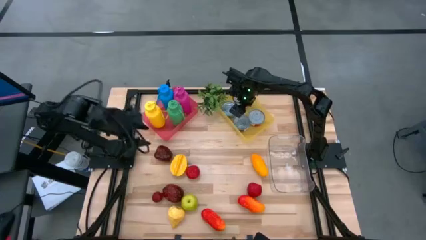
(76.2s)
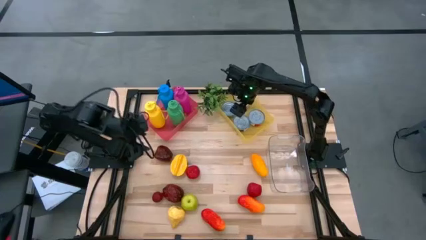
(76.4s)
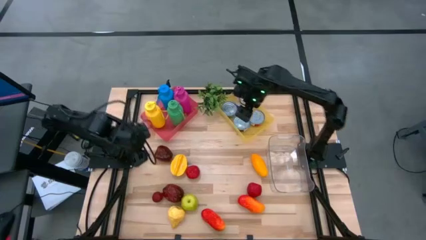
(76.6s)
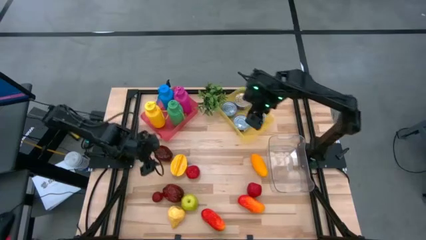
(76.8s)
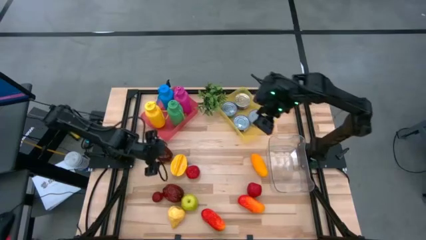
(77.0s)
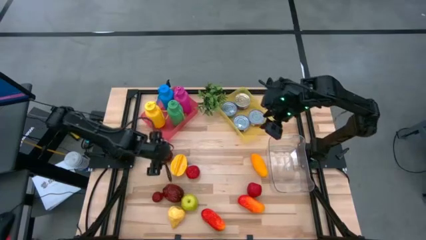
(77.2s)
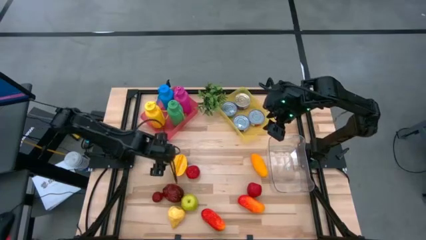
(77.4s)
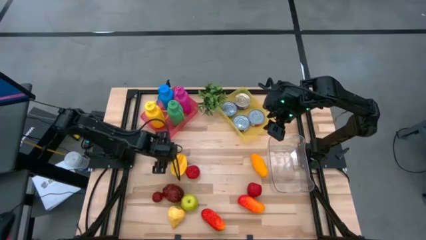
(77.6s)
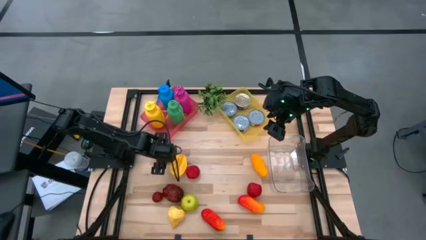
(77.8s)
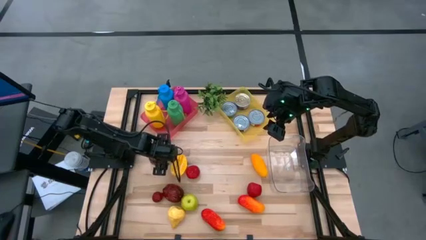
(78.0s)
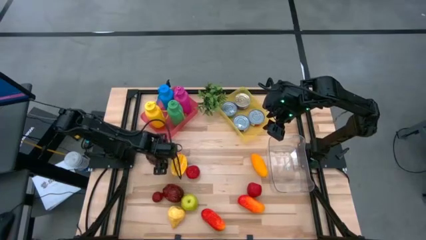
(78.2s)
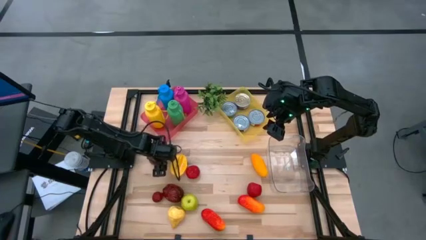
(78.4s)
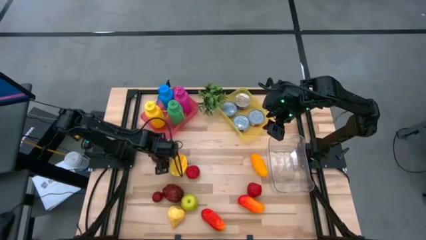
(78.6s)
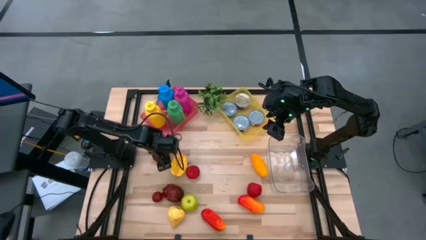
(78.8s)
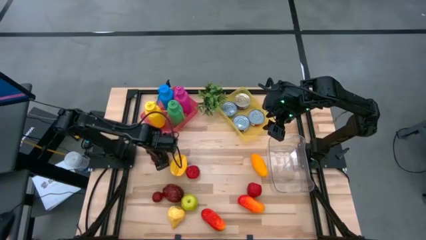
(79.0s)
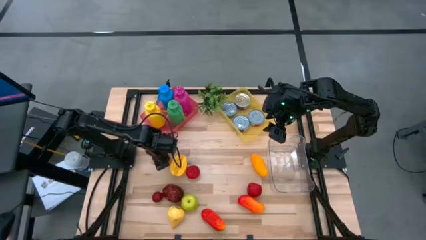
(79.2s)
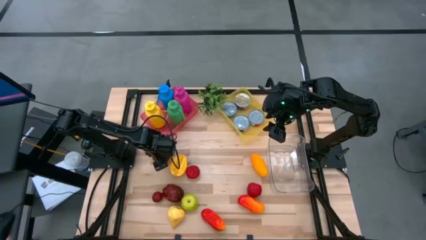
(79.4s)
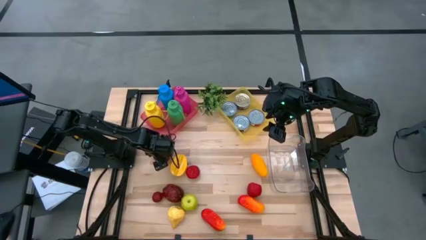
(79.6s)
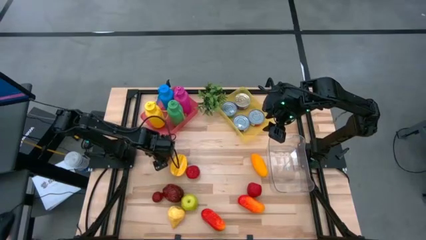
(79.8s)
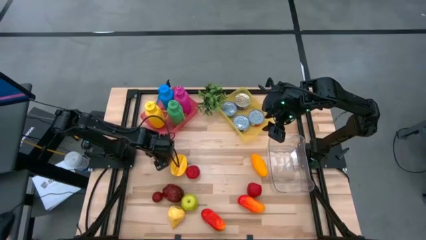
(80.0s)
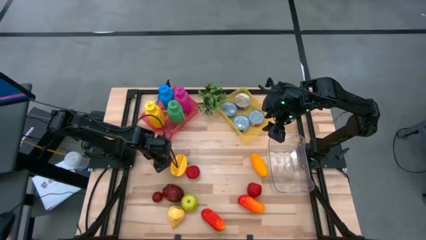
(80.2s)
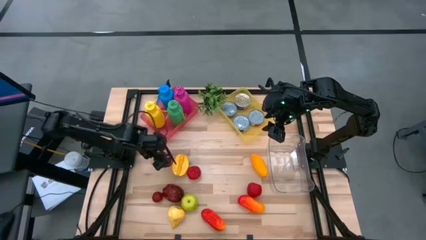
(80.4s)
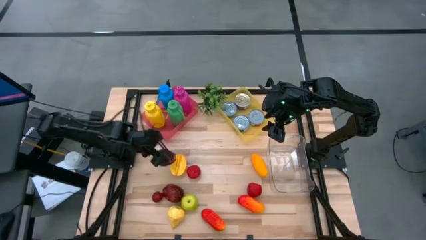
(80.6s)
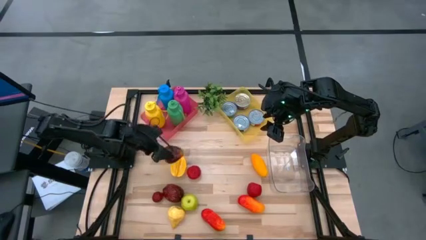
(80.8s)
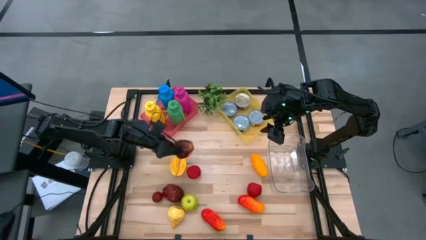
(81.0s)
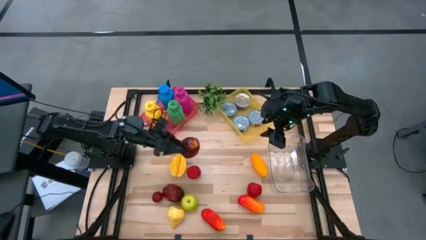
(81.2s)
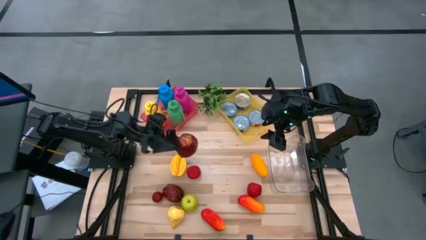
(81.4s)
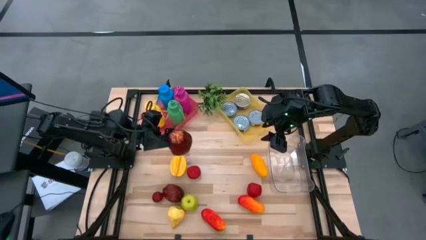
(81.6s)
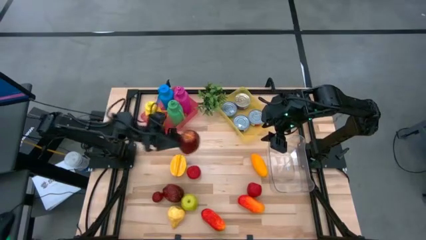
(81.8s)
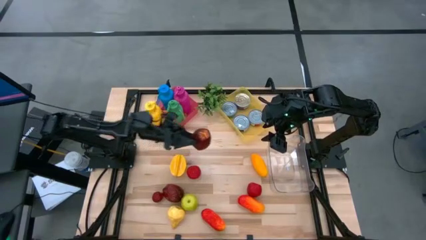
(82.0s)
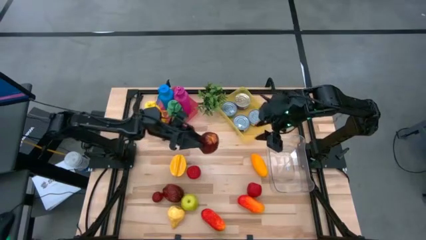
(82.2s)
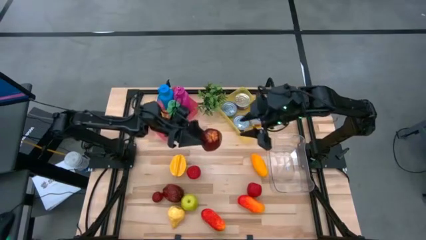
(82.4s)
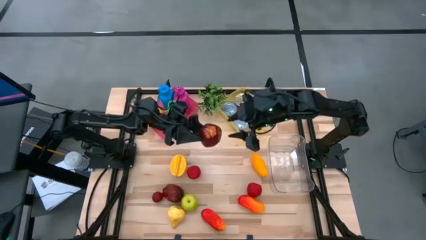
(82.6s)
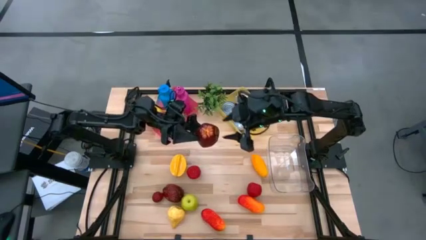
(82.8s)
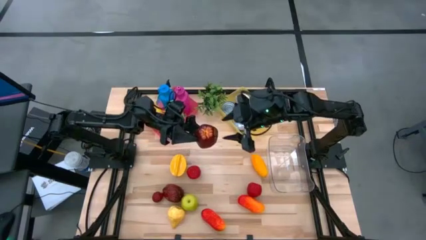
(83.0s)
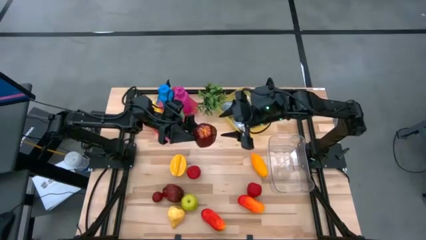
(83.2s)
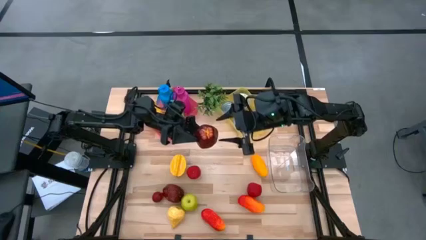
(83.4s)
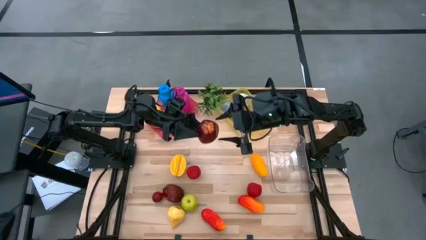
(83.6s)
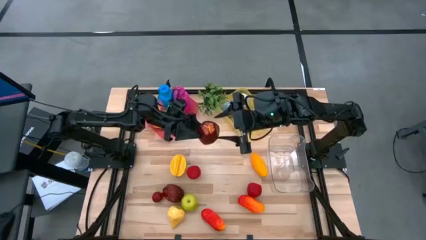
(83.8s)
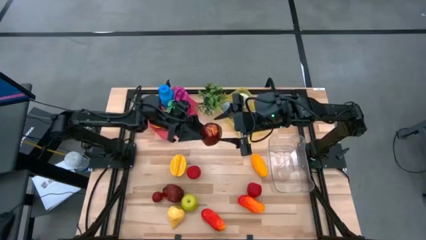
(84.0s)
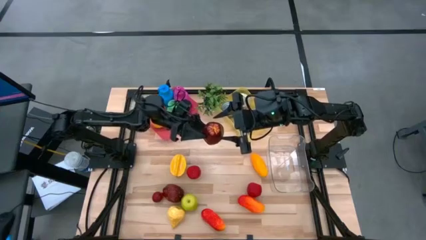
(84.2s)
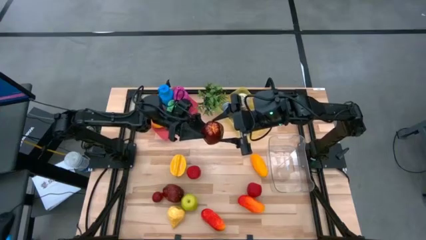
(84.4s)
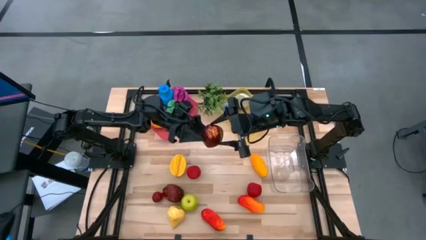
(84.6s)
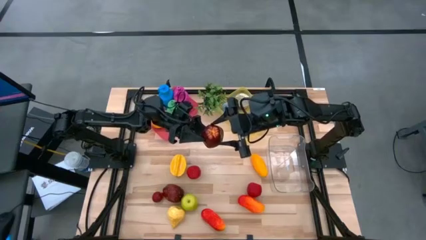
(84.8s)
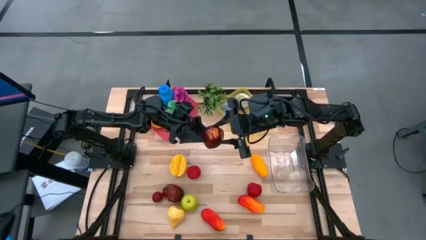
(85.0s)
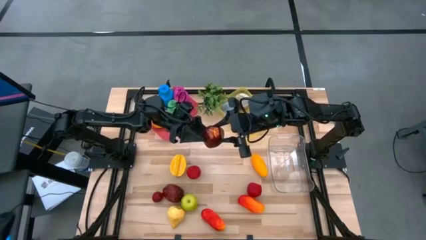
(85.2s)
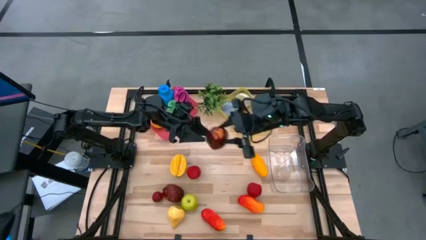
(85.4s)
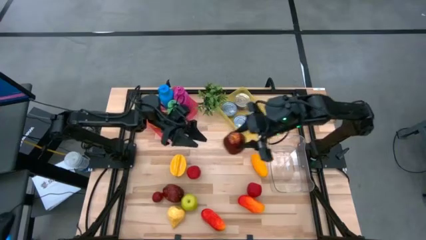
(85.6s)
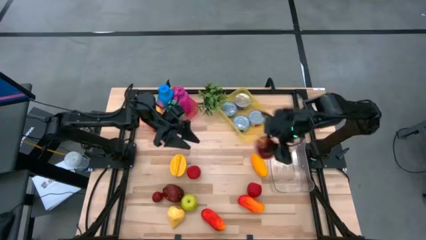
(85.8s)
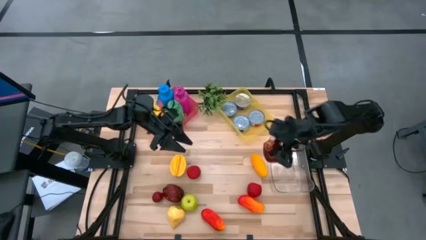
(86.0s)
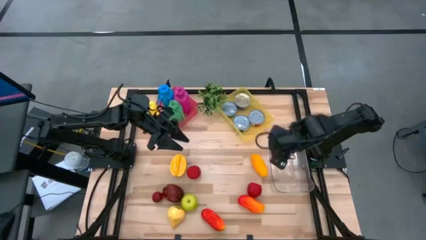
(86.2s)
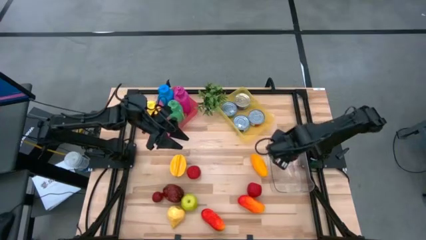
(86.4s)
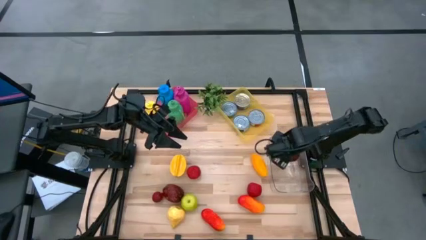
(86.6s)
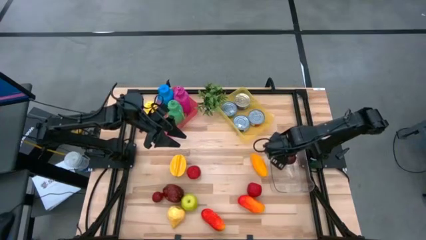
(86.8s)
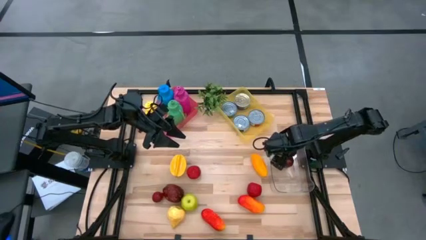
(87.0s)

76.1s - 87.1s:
Task: Pick & Place Food Item
Put the top dark red apple into the transparent bin

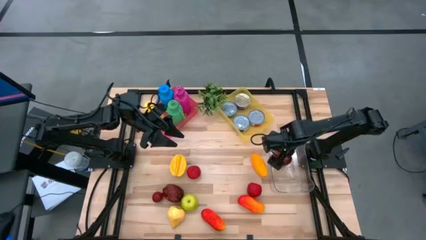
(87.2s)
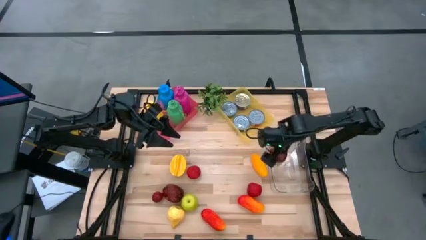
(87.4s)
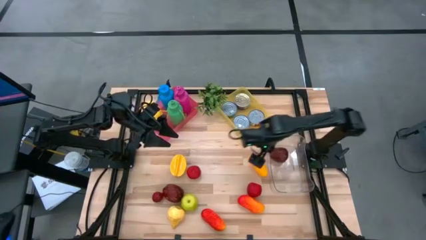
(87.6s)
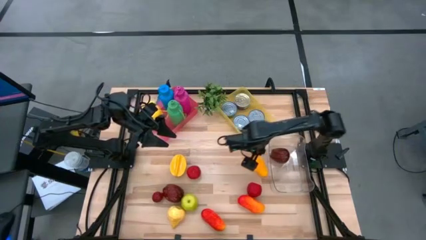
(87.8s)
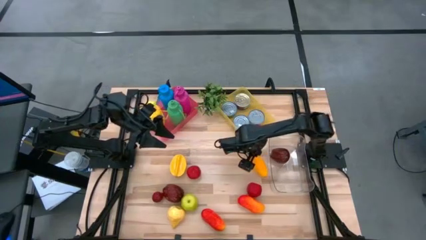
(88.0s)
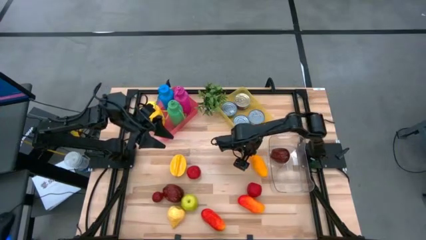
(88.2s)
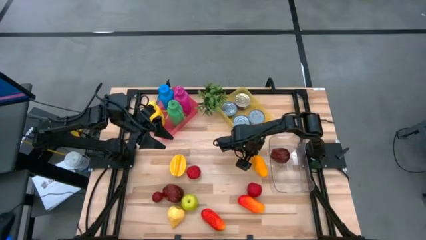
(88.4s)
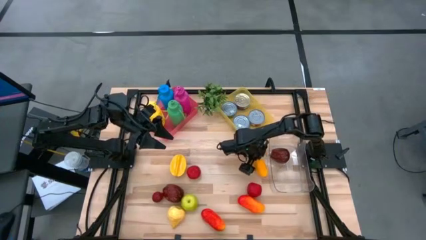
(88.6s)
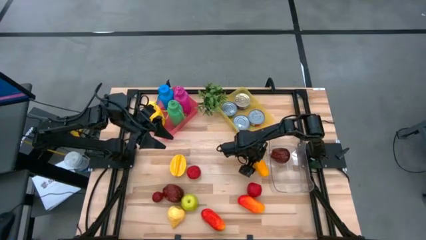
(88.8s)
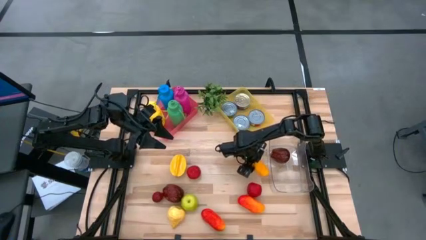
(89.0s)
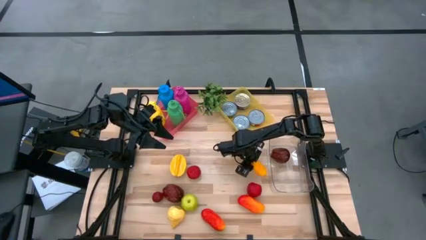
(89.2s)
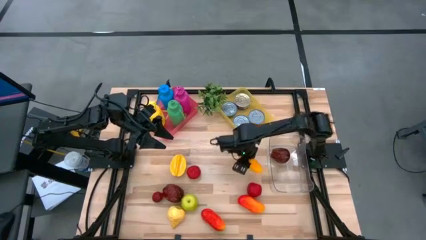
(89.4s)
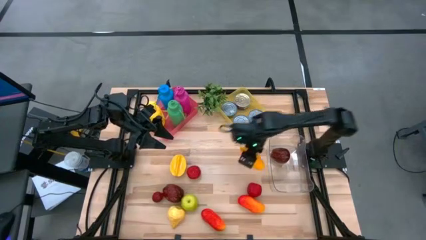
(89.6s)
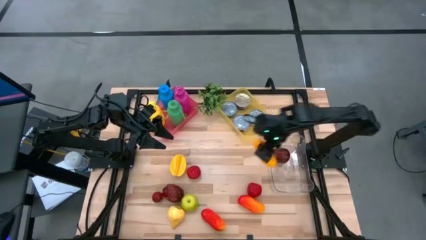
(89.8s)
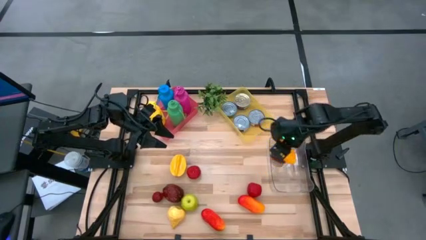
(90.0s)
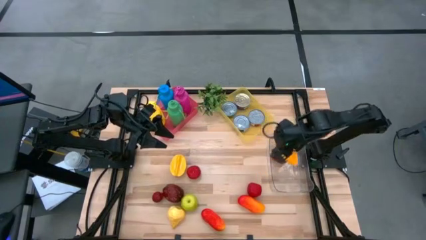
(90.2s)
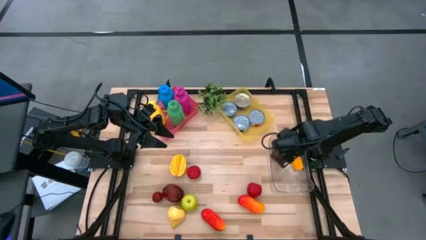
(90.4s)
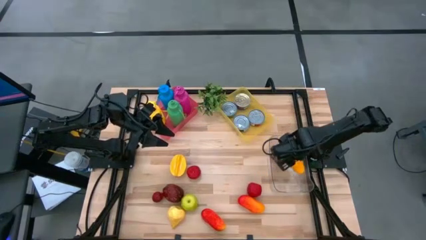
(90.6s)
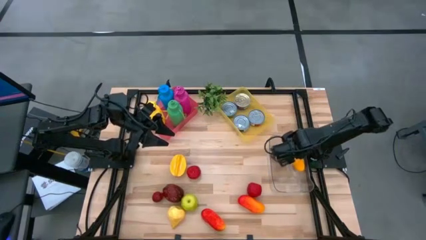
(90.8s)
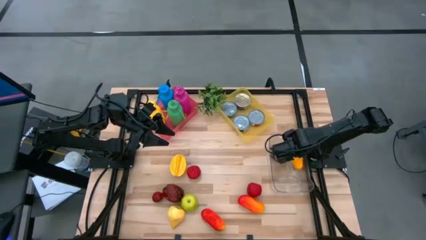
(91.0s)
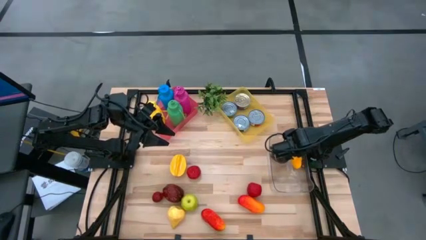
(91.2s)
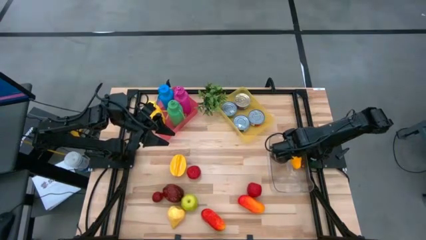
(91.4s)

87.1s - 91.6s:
Put the mango into the transparent bin

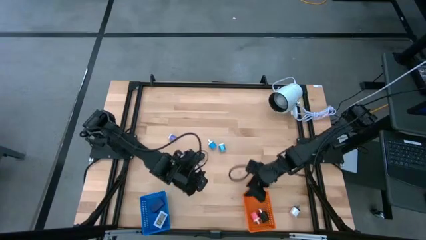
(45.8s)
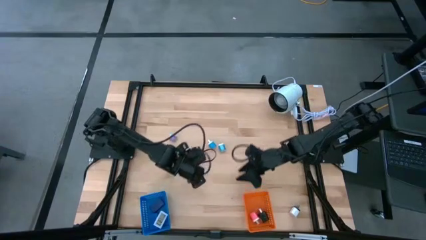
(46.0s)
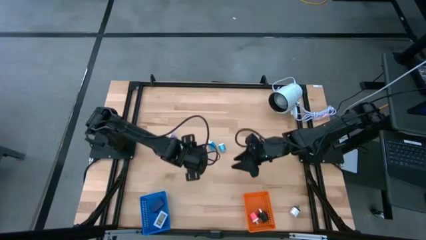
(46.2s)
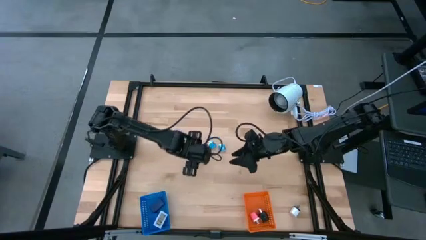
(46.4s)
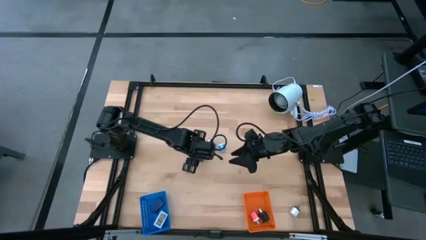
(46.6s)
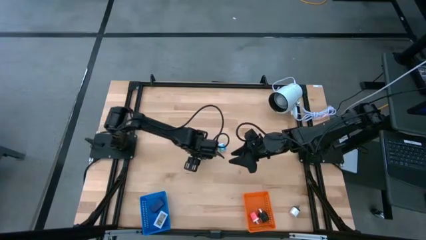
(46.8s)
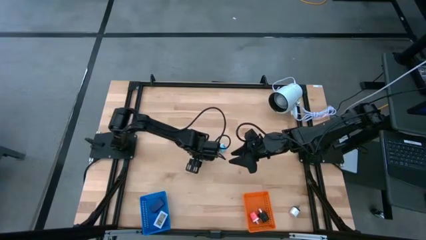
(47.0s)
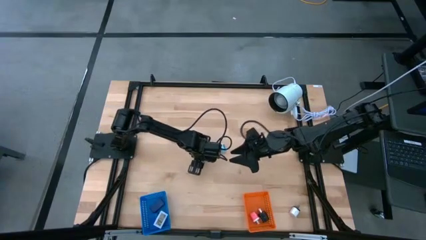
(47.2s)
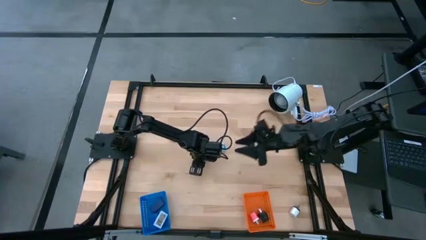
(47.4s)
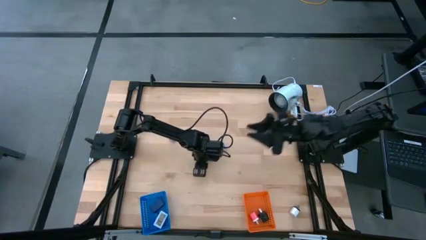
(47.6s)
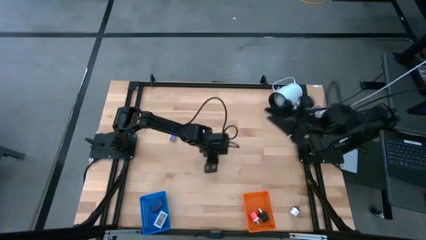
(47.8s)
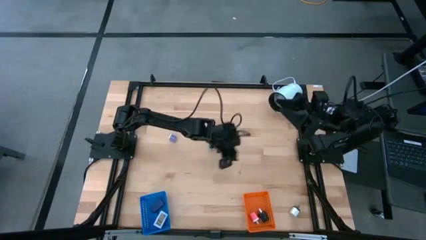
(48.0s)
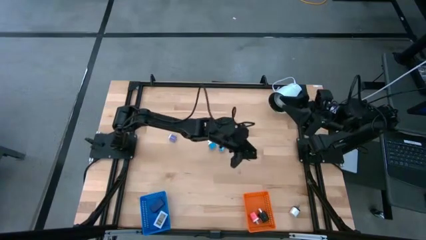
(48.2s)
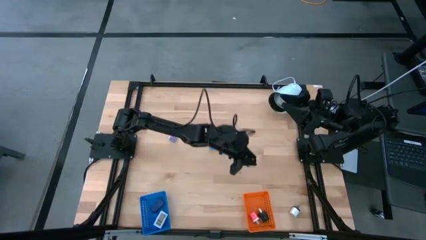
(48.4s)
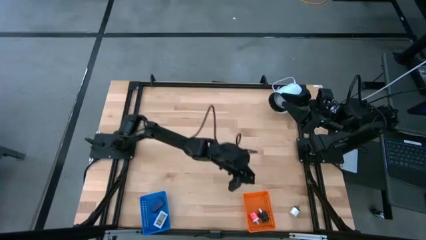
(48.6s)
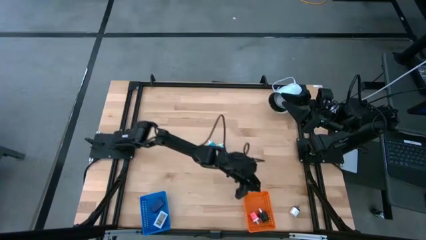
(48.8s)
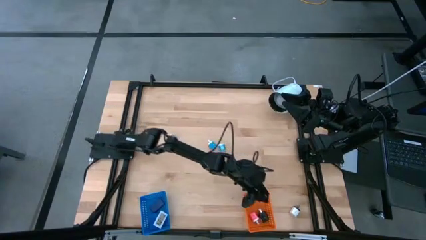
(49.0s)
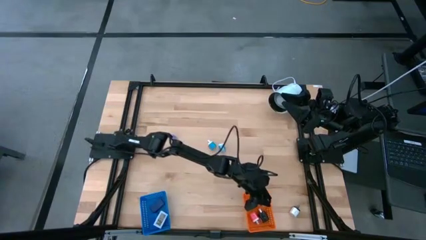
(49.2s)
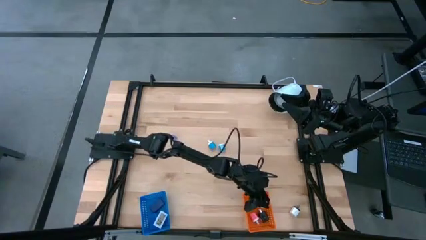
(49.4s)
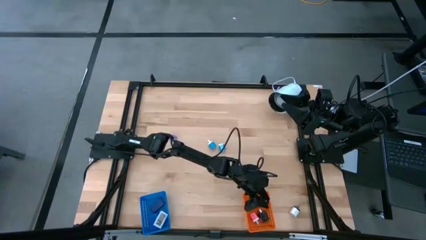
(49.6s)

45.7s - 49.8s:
Task: Pick & Place Office items
Put the black charger adapter into the orange bin
